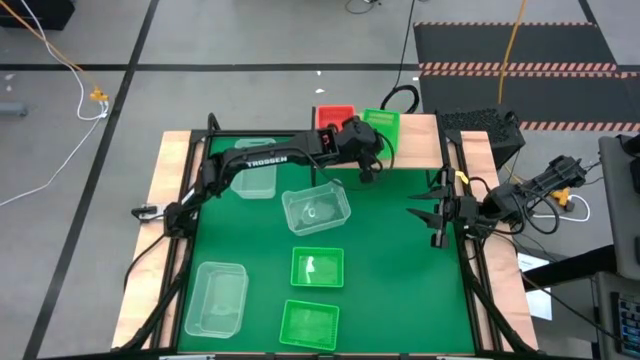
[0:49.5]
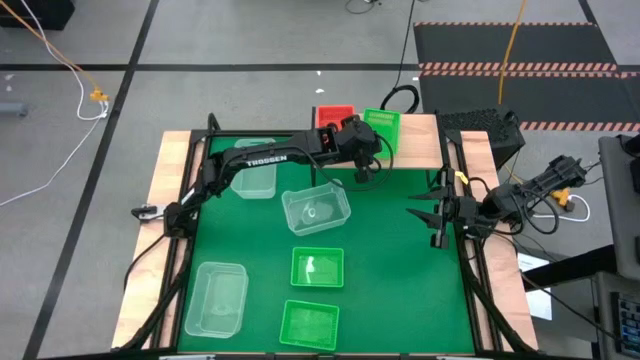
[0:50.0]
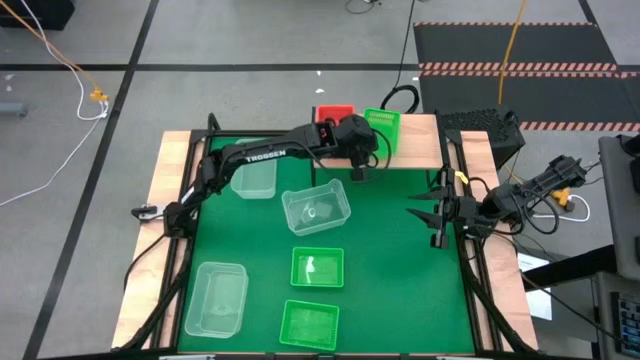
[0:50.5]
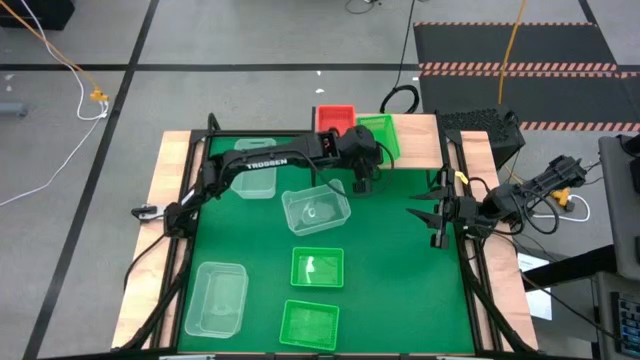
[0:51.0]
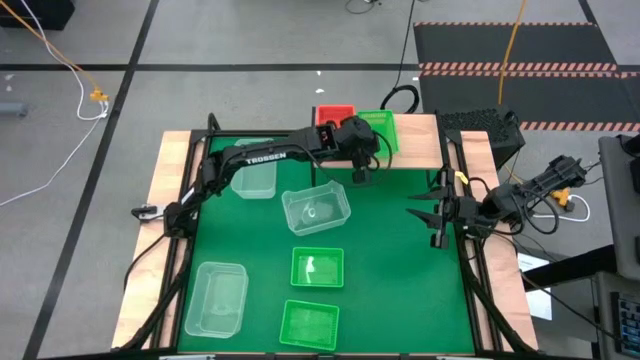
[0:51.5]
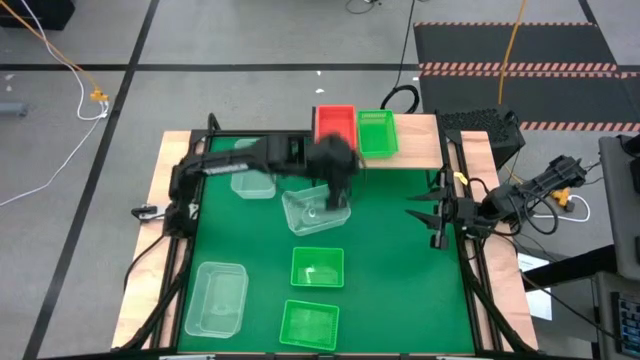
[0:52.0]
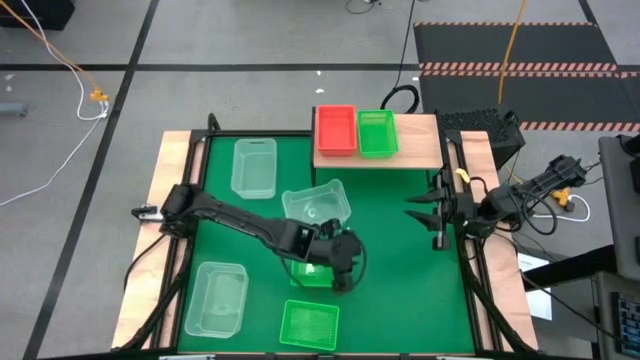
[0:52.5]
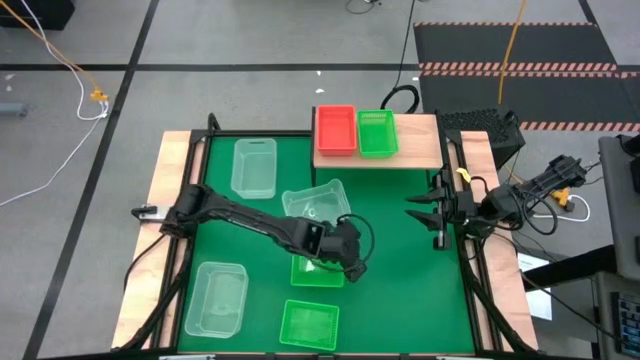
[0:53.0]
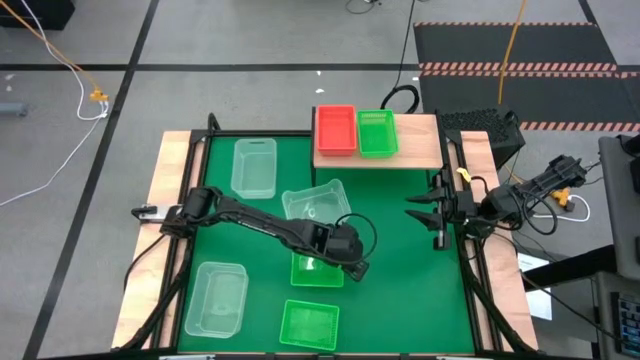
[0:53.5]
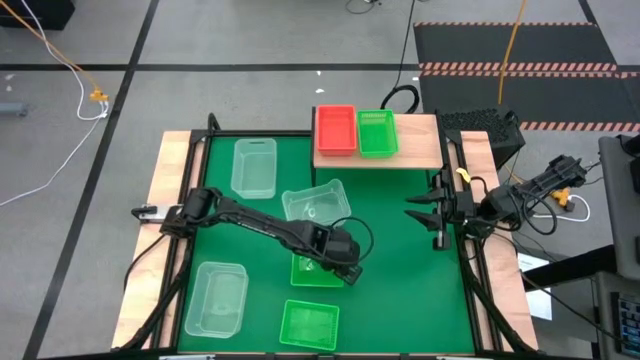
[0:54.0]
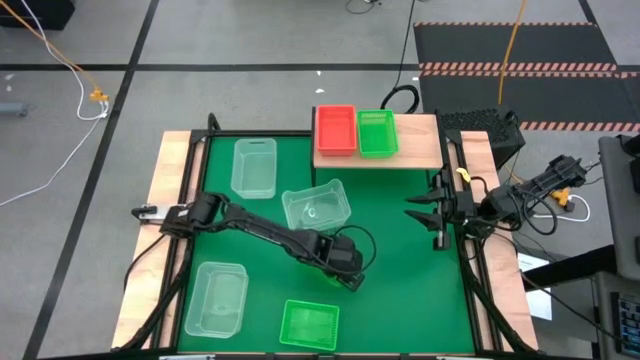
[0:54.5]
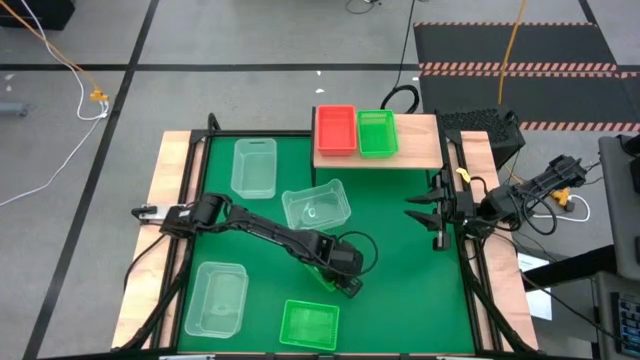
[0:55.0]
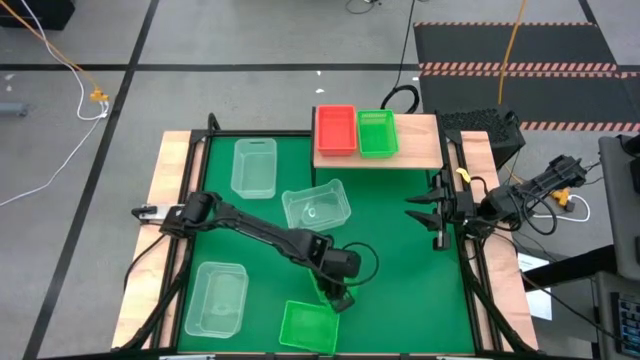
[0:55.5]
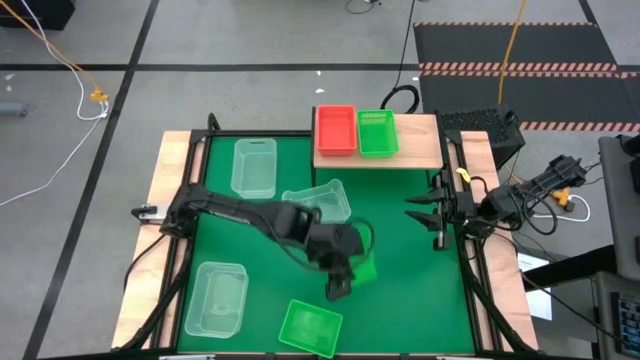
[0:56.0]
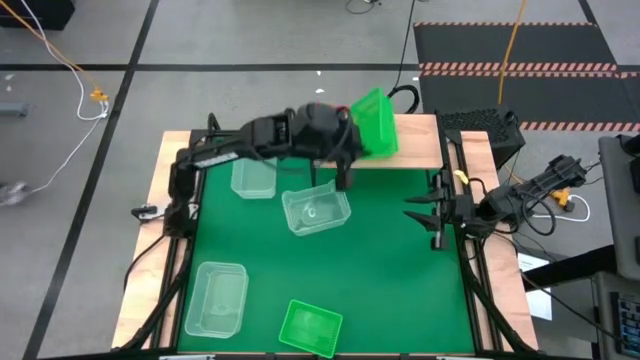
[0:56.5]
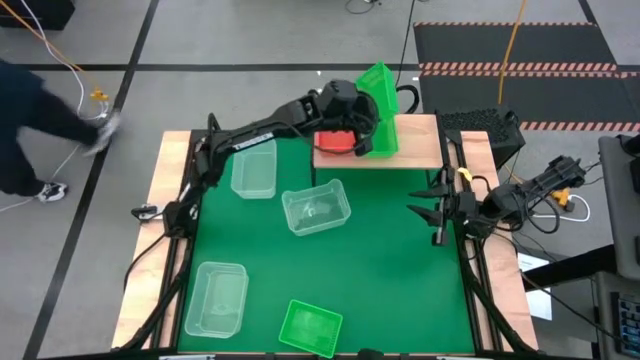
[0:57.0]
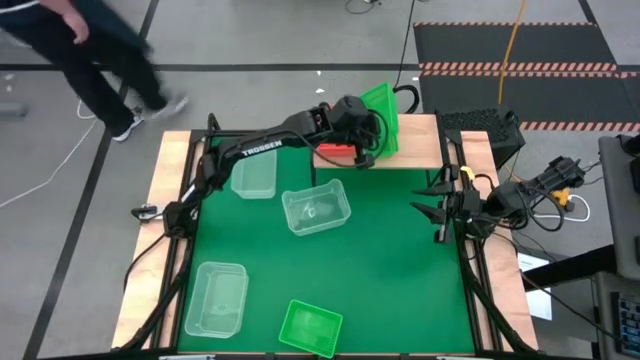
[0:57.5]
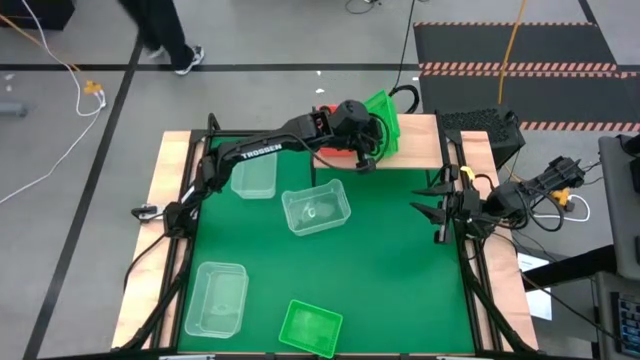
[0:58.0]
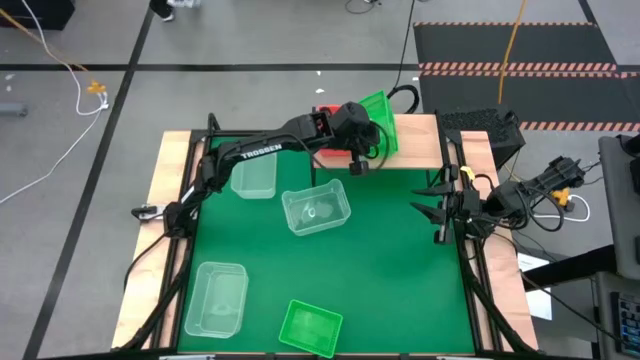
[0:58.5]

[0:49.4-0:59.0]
Task: Stack baskets on shelf by color
Stack the top green bin on the on the top of the green bin

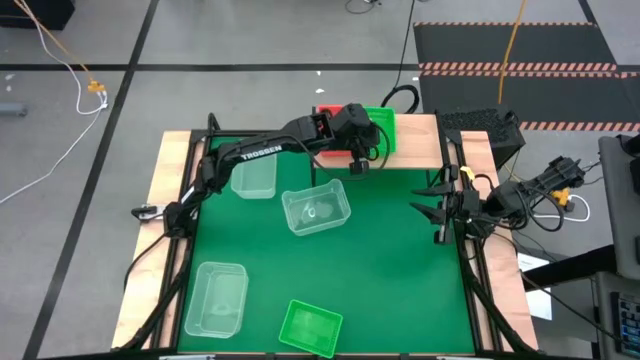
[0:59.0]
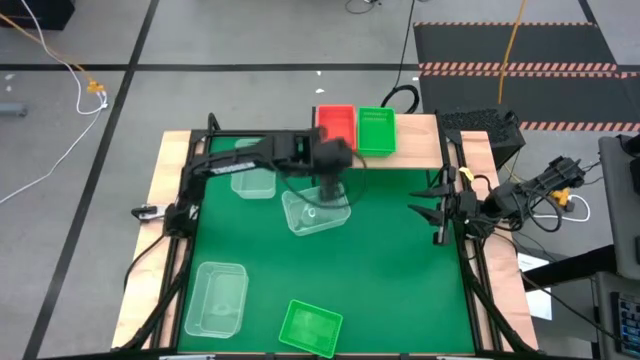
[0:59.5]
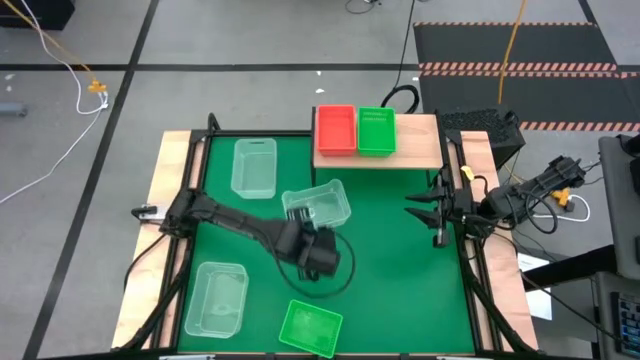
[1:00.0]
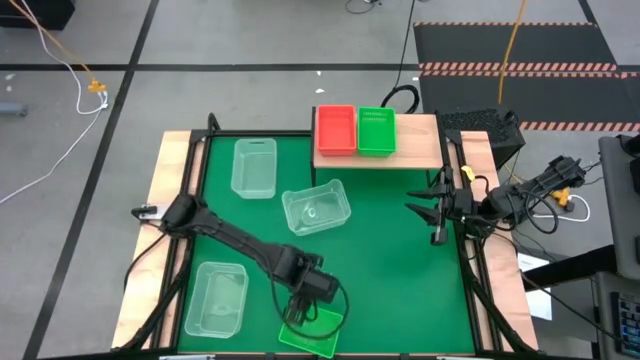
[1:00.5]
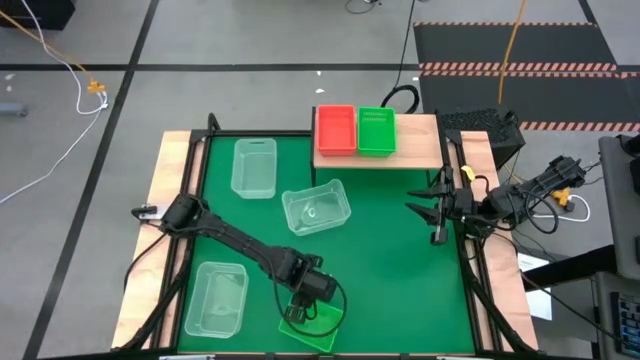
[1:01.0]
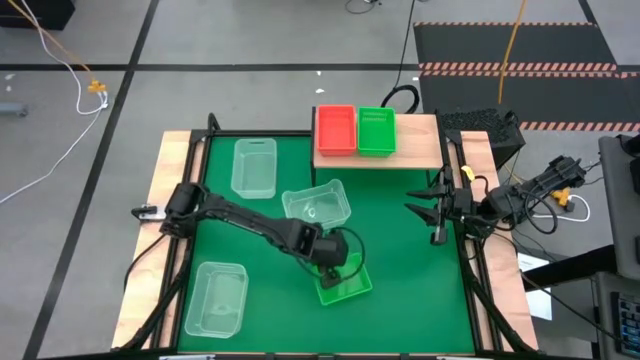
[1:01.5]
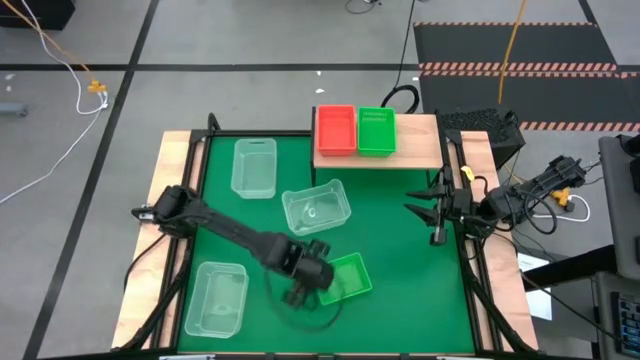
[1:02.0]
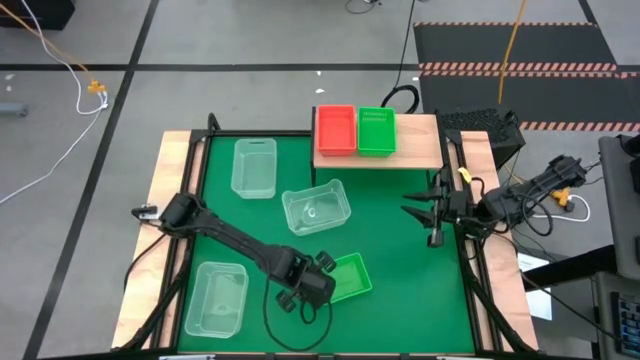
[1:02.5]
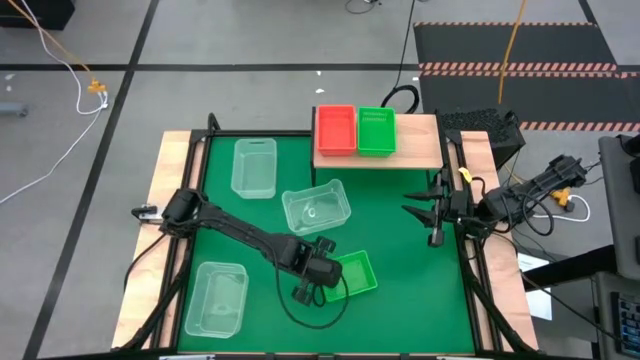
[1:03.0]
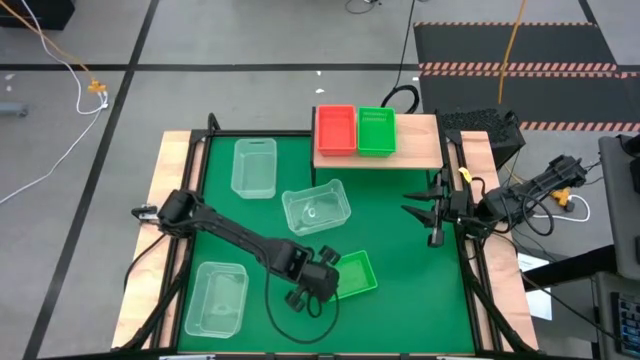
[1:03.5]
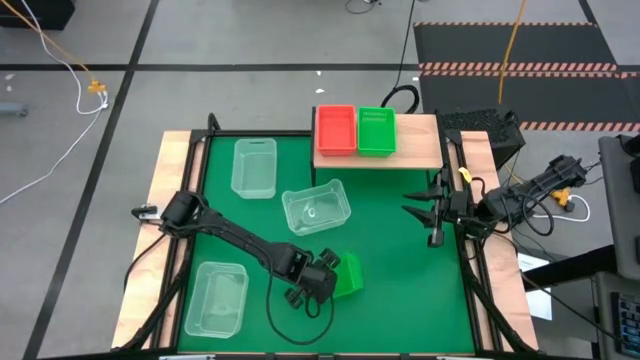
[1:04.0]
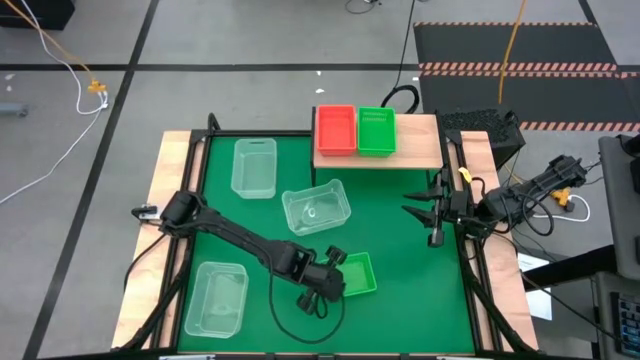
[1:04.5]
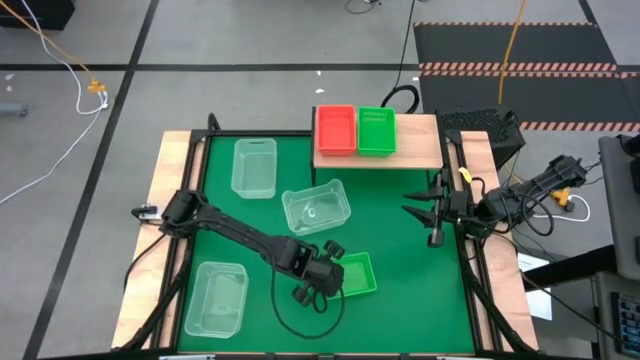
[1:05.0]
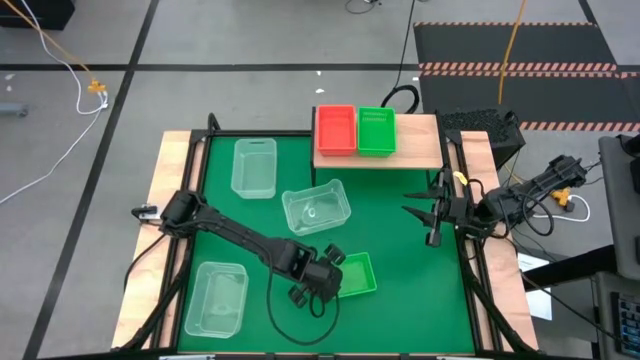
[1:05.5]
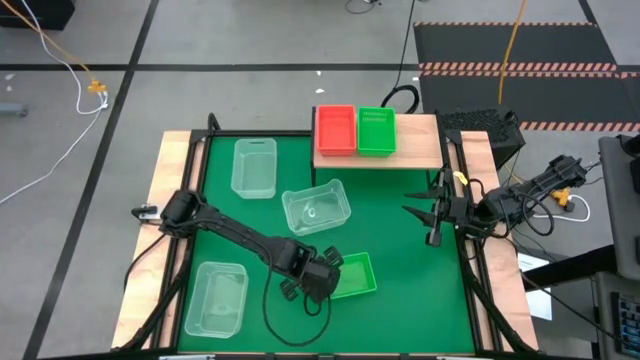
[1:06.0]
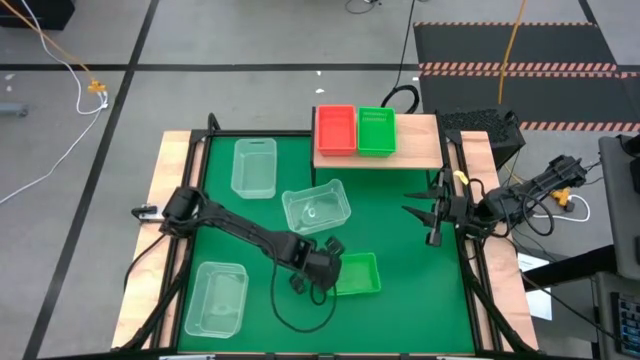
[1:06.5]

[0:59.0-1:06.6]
Stack the green bin on the top of the green bin

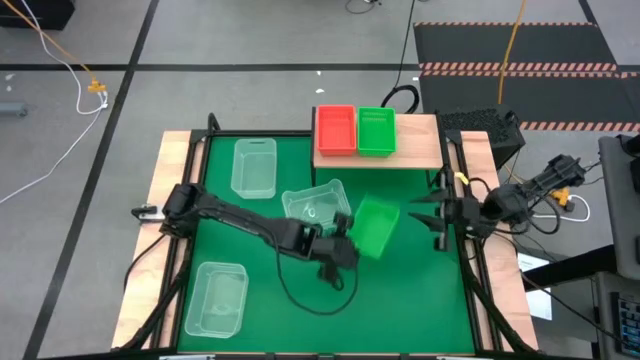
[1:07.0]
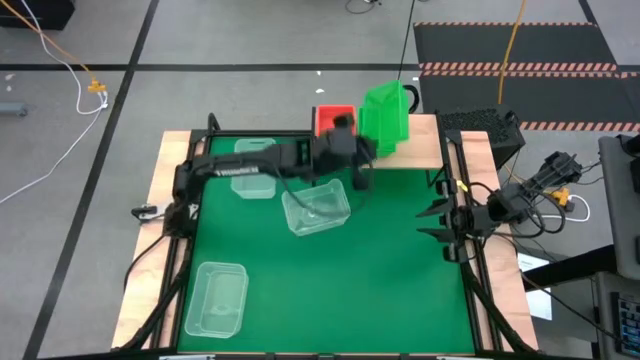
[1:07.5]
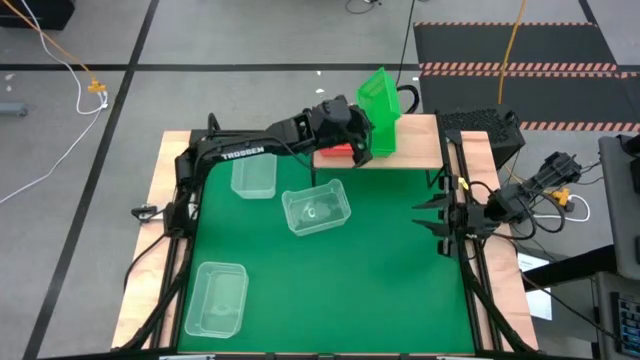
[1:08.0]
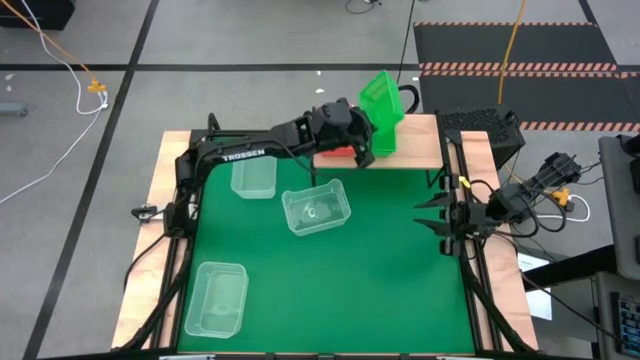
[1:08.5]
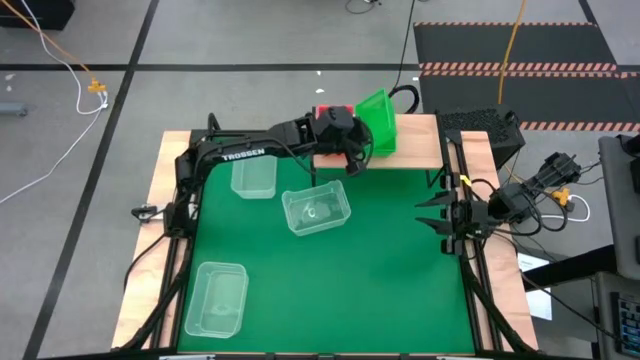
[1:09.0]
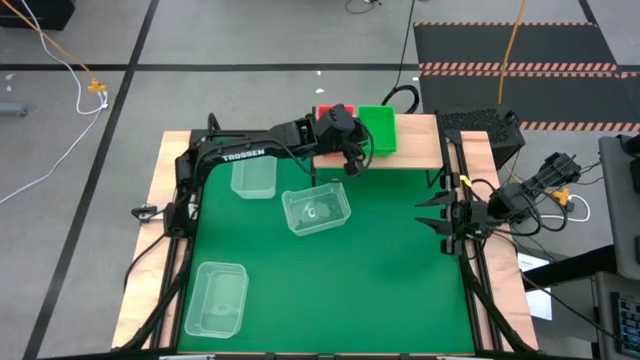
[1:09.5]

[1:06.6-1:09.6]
Stack the green bin on the top of the green bin

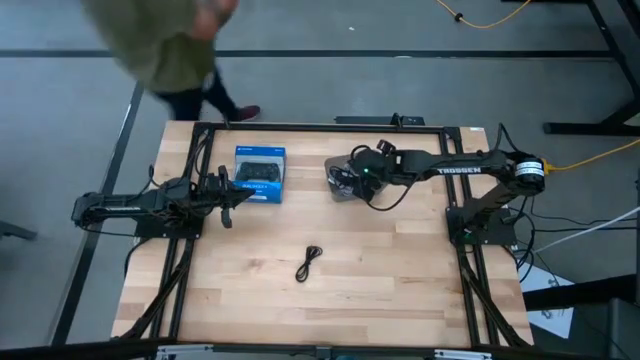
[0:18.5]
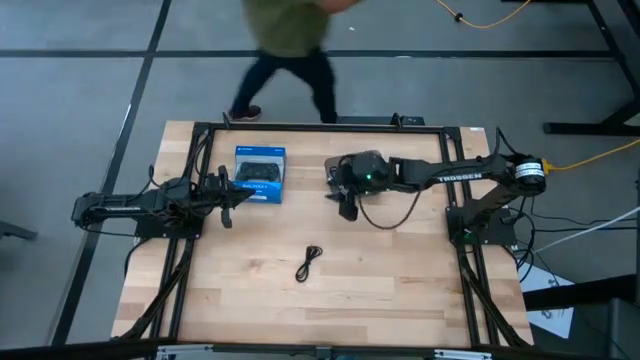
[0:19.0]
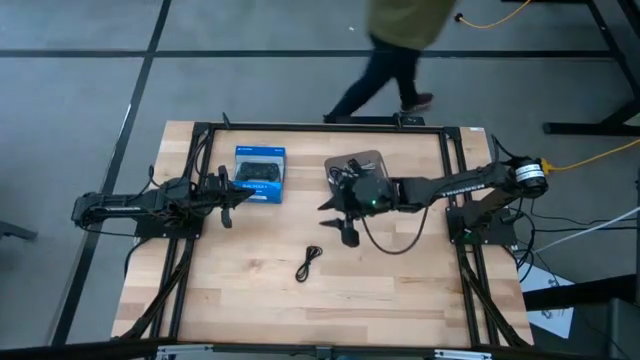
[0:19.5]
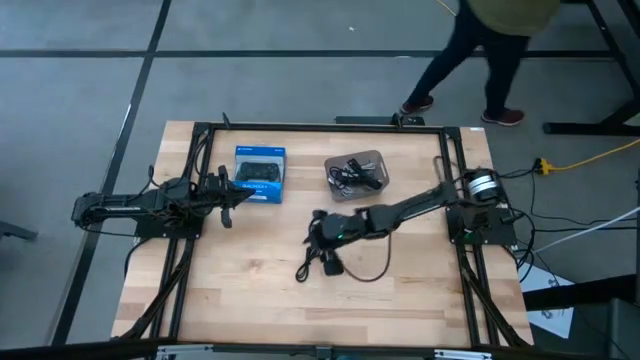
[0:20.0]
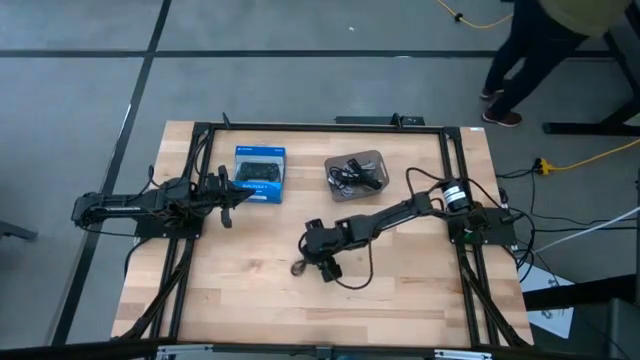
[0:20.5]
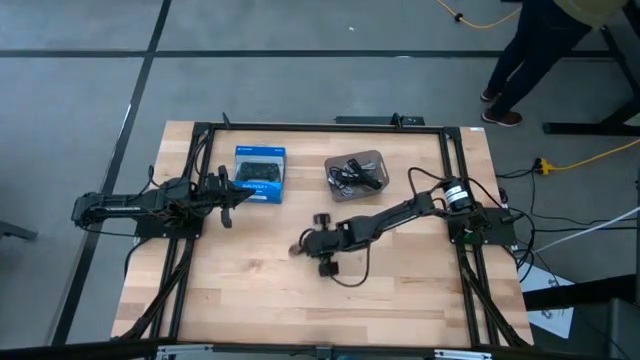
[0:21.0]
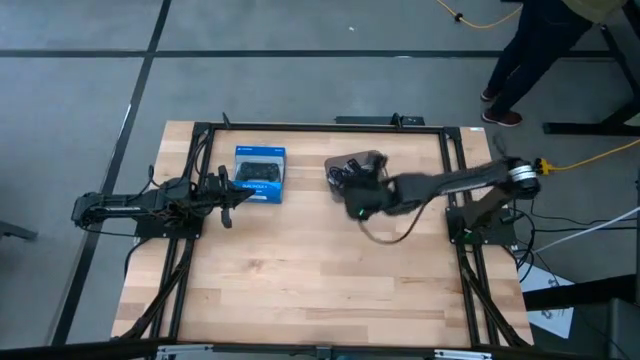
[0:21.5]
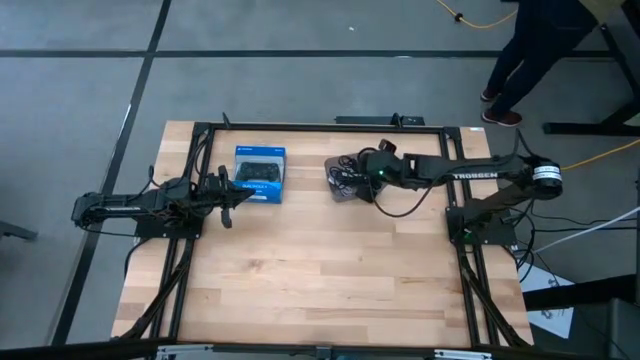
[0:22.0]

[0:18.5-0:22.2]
Task: Pick and place USB-C Cables
Put the black charger cable into the black bin
